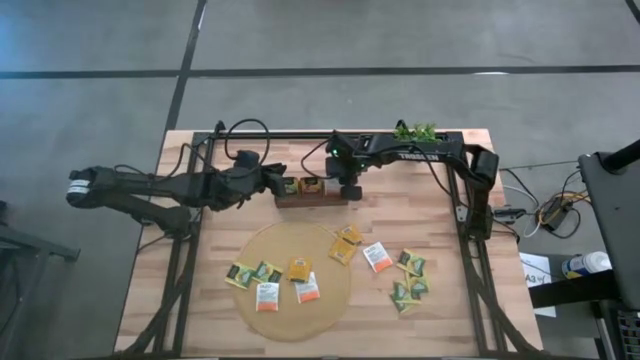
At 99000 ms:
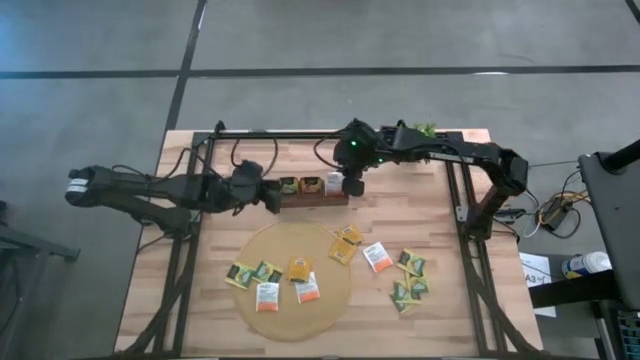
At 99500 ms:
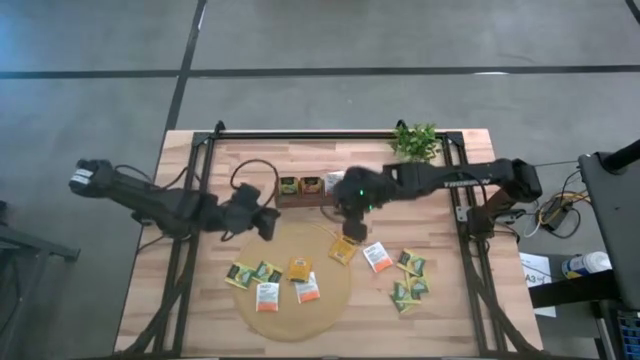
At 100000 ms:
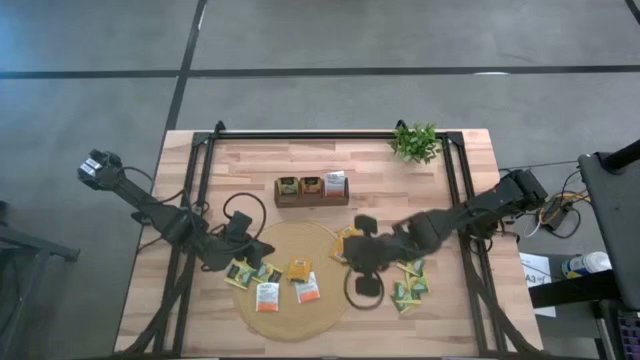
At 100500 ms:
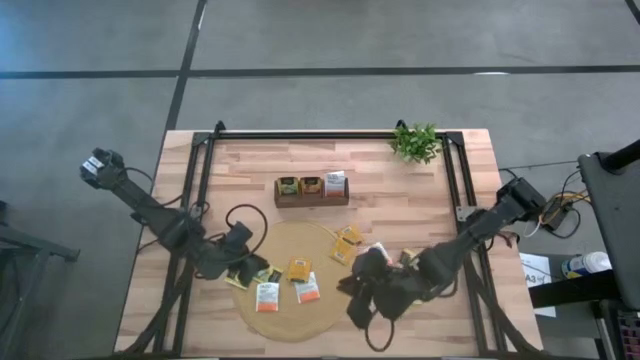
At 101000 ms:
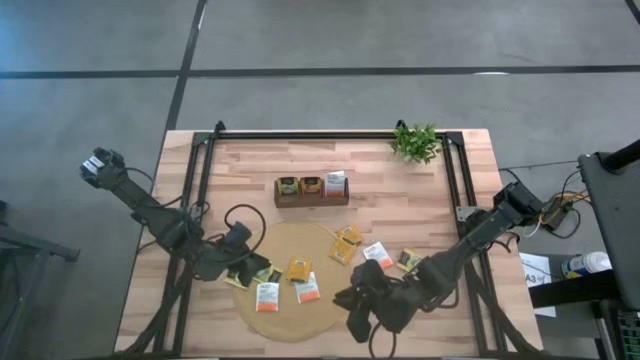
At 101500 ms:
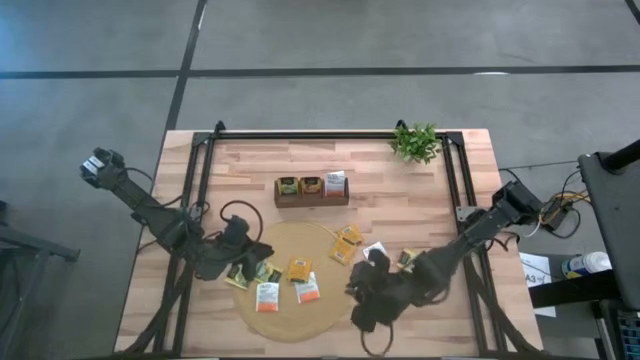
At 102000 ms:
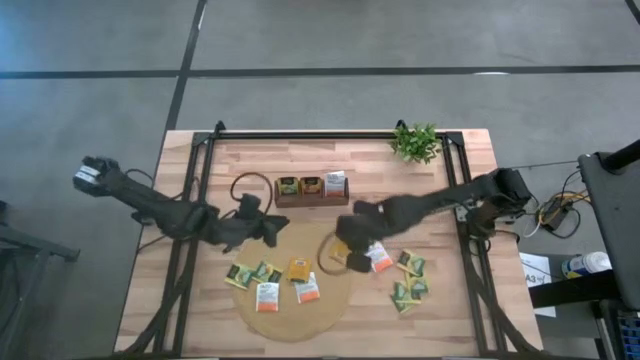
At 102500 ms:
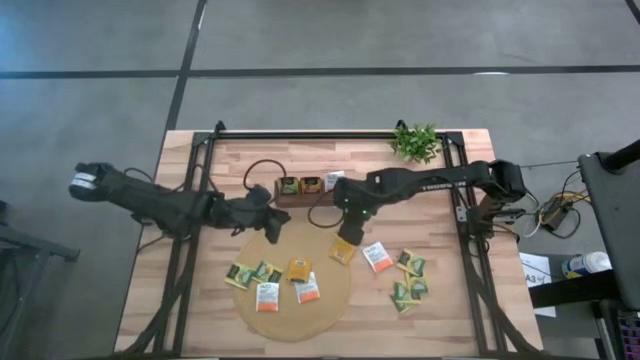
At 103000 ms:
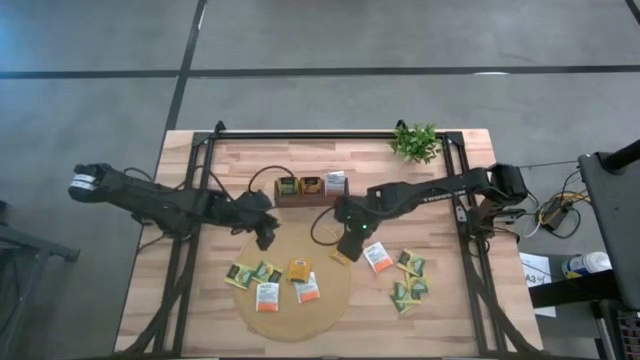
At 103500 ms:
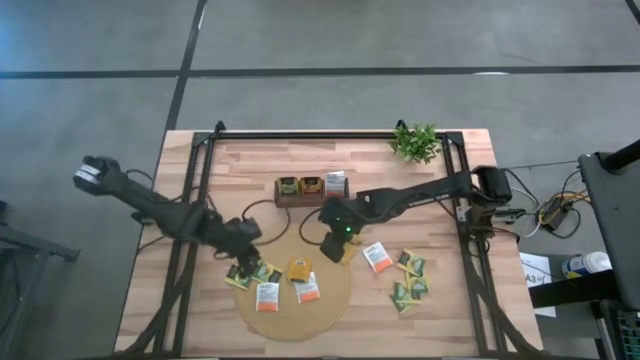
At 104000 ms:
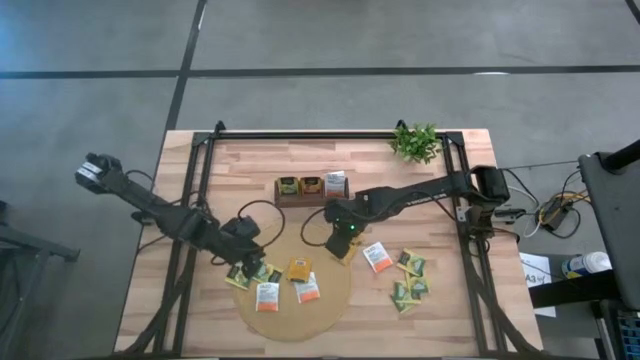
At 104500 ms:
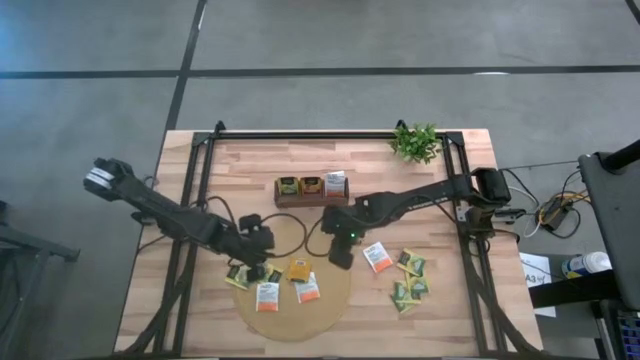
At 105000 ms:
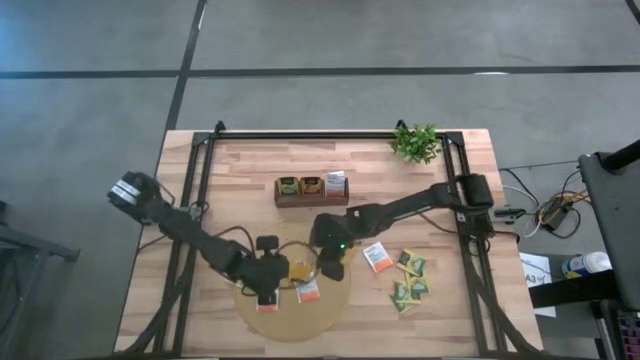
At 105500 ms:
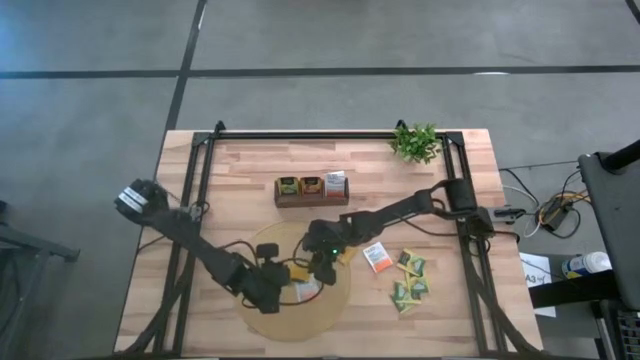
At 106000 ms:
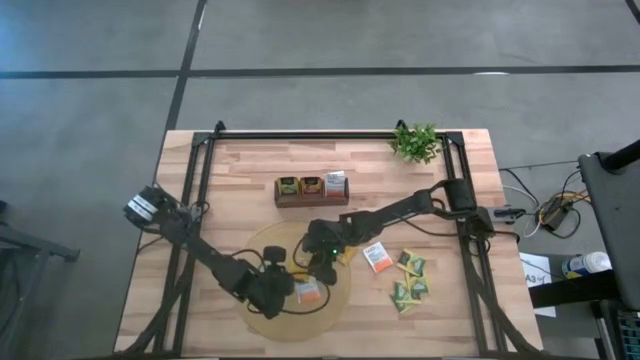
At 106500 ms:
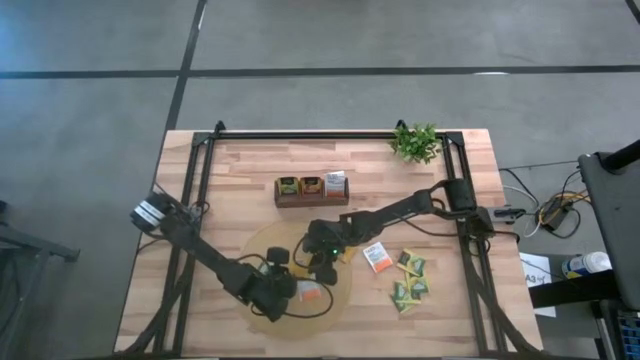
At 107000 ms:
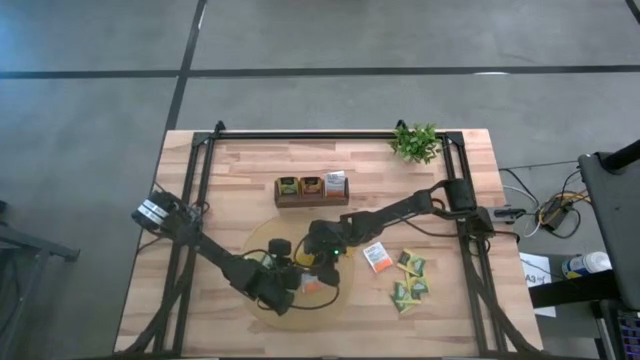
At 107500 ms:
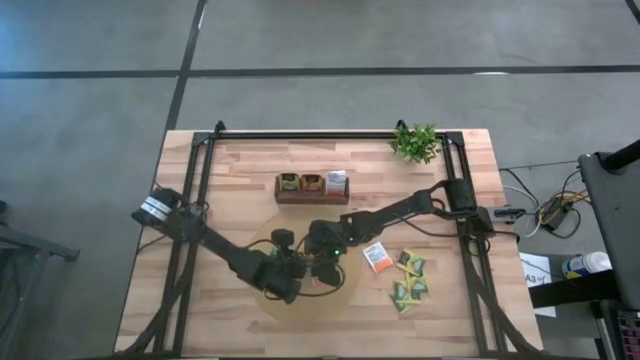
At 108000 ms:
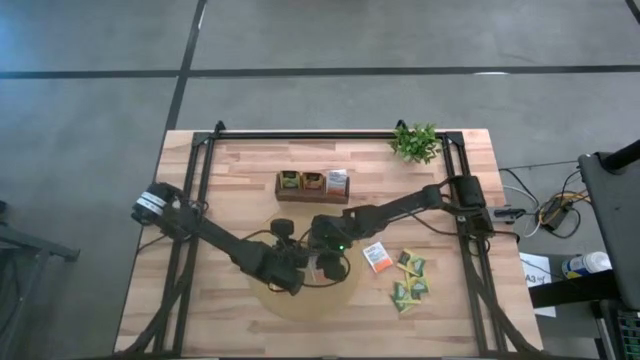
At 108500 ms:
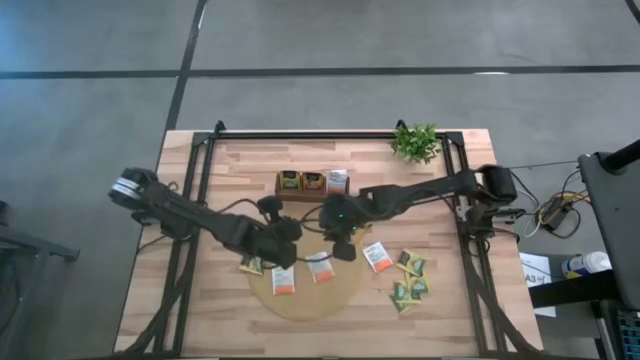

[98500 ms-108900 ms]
Task: Pick & Place Tea
Put the yellow tea bag into the middle section of the wooden organizer

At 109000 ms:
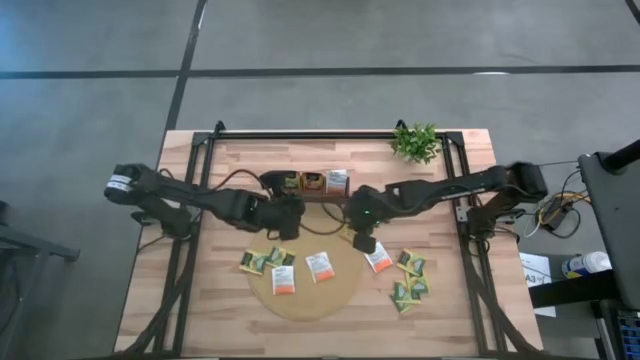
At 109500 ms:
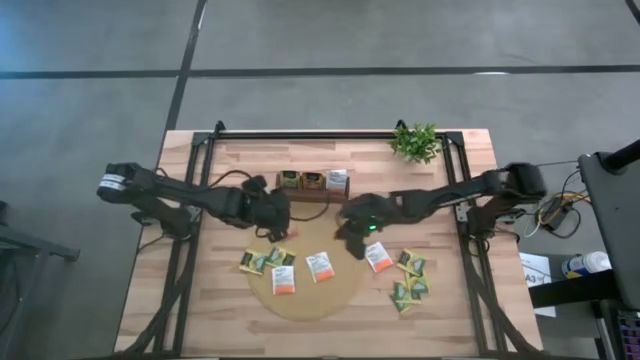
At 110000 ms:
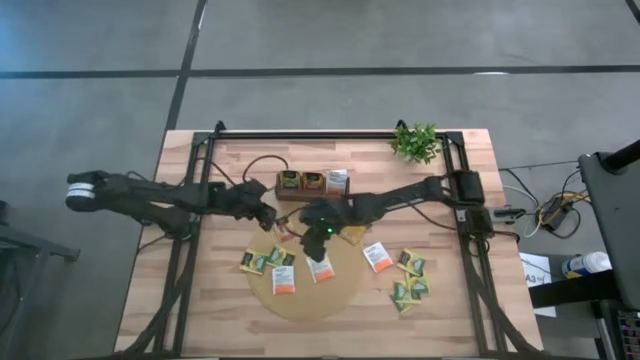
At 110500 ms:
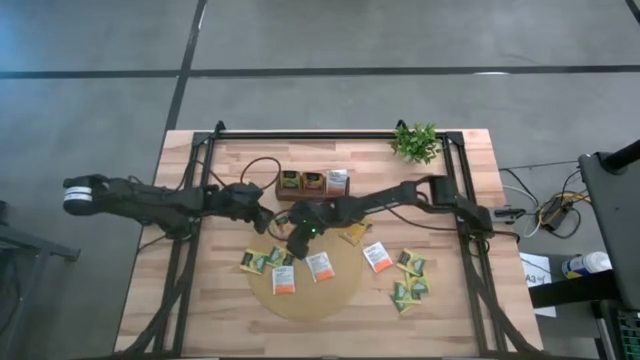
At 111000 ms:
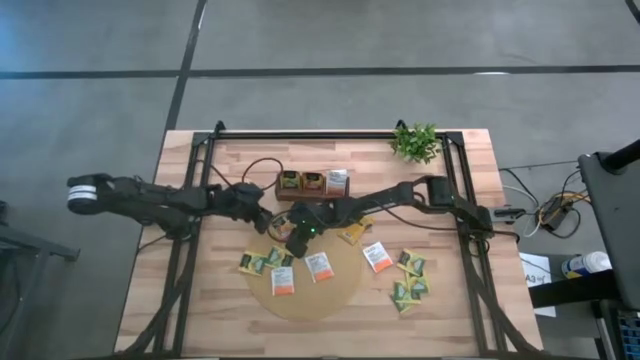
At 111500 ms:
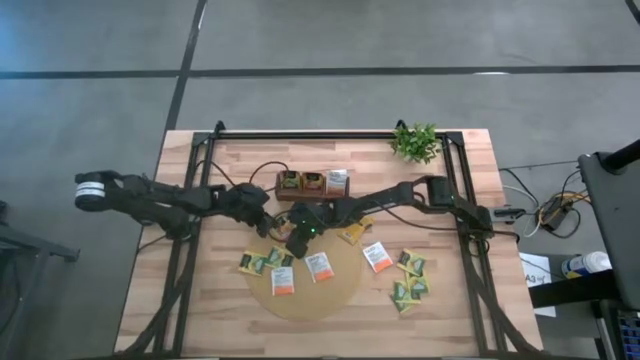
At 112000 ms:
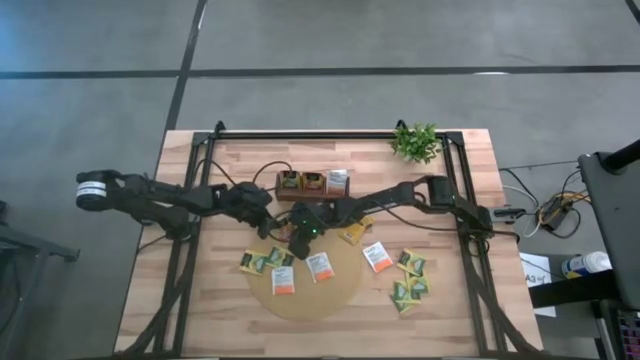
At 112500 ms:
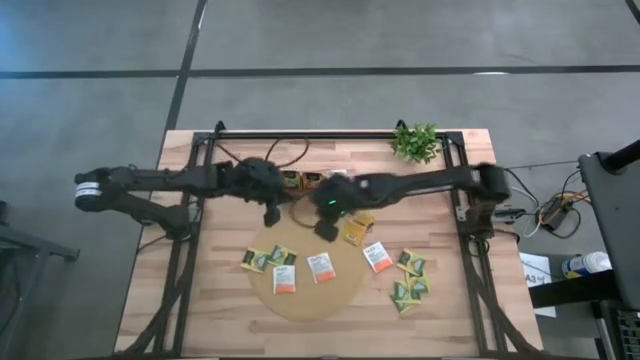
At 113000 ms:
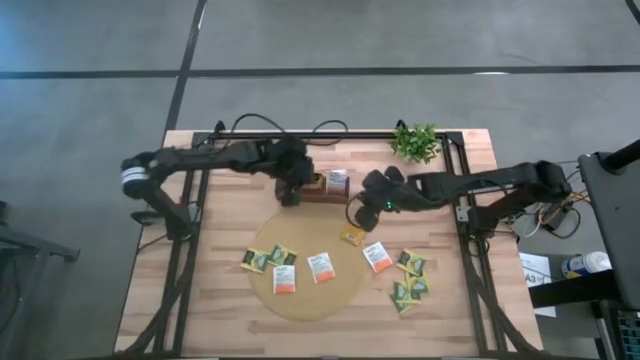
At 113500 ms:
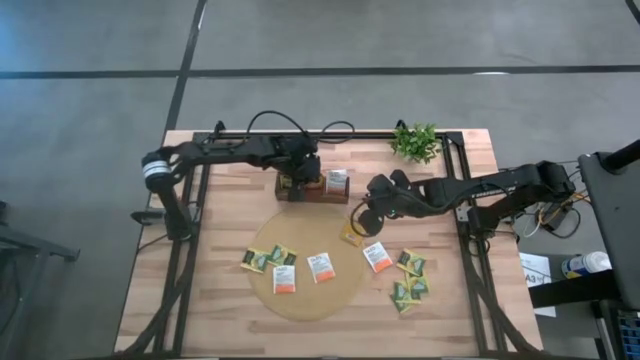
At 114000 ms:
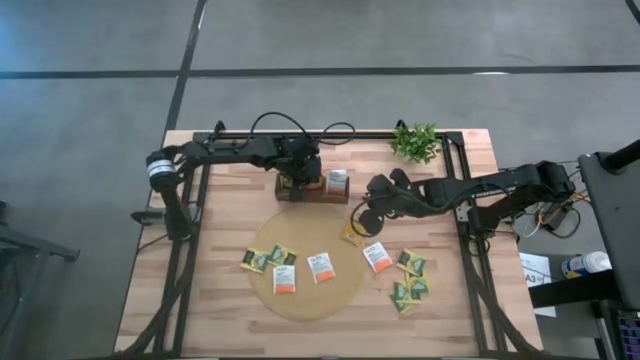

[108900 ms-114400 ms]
Put the yellow tea bag into the middle section of the wooden organizer

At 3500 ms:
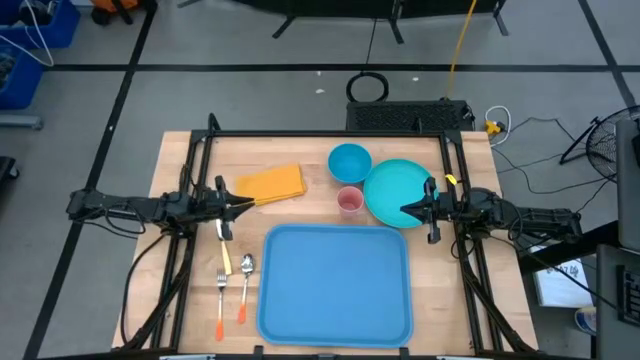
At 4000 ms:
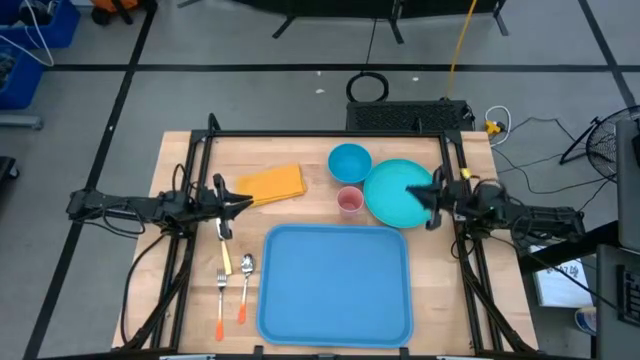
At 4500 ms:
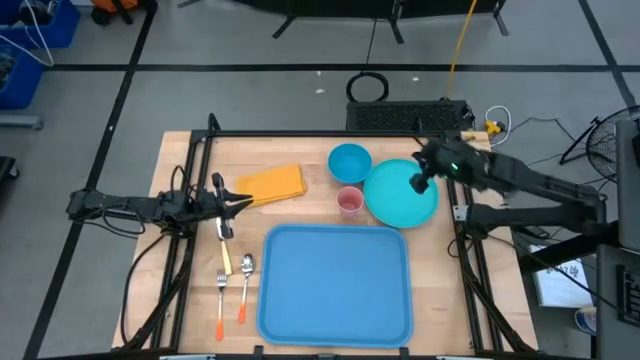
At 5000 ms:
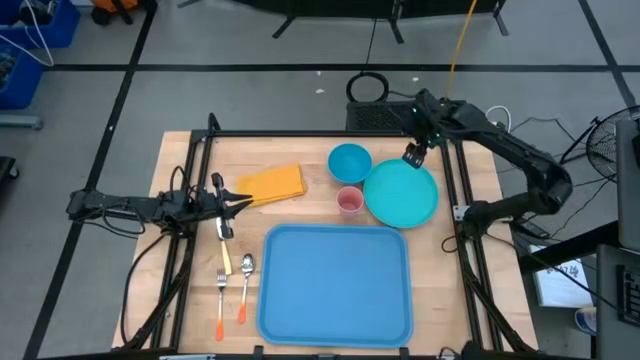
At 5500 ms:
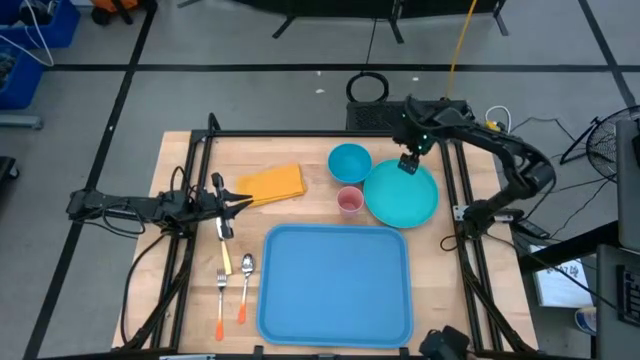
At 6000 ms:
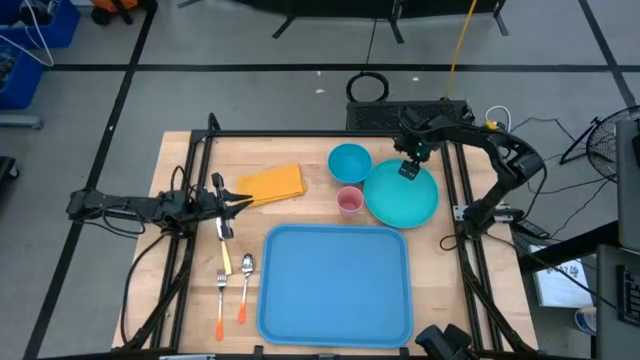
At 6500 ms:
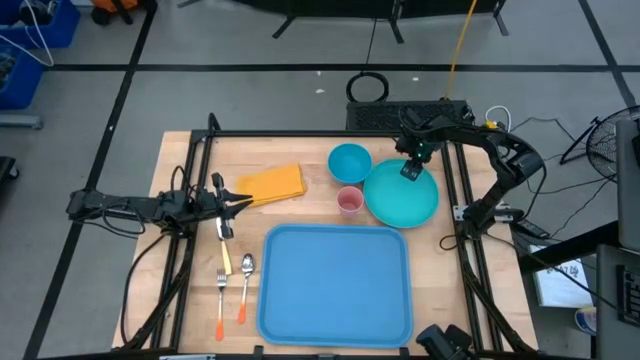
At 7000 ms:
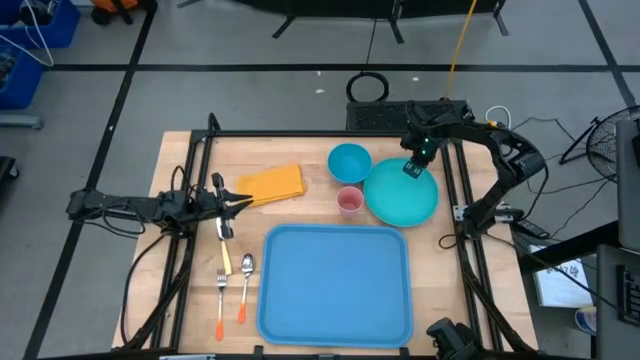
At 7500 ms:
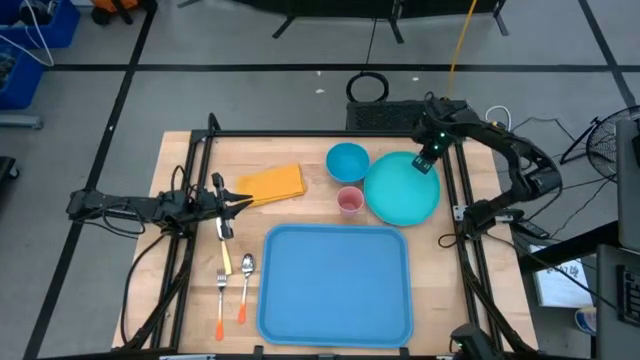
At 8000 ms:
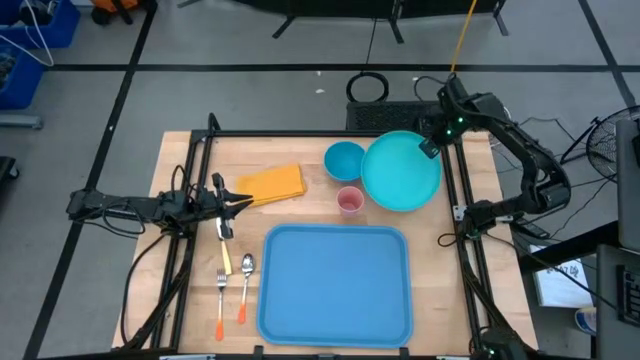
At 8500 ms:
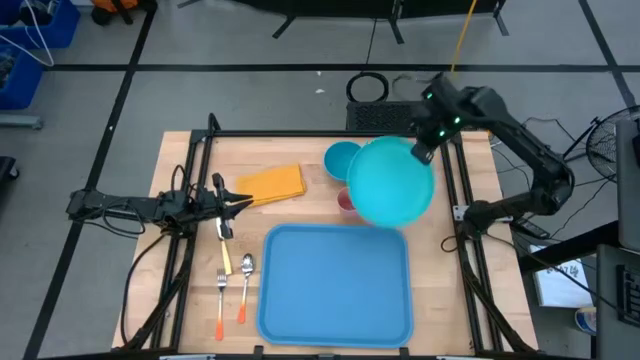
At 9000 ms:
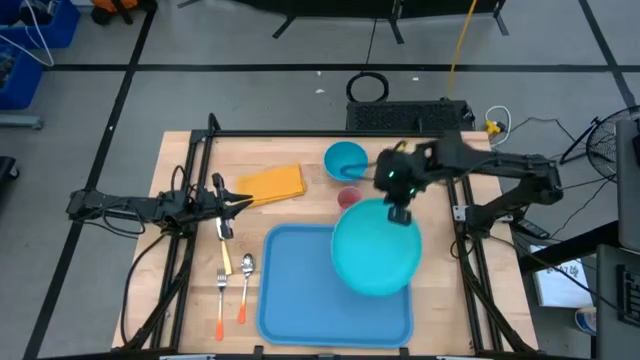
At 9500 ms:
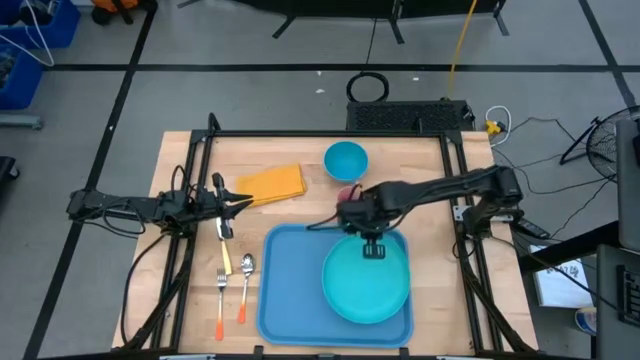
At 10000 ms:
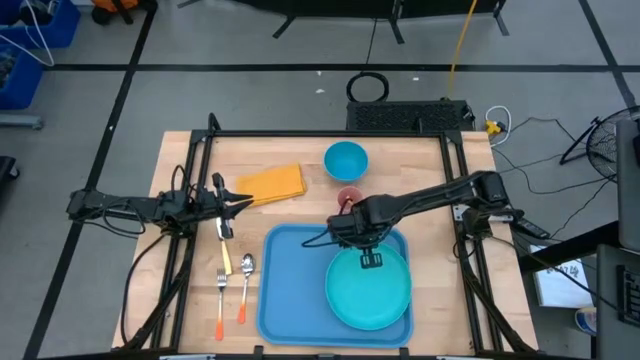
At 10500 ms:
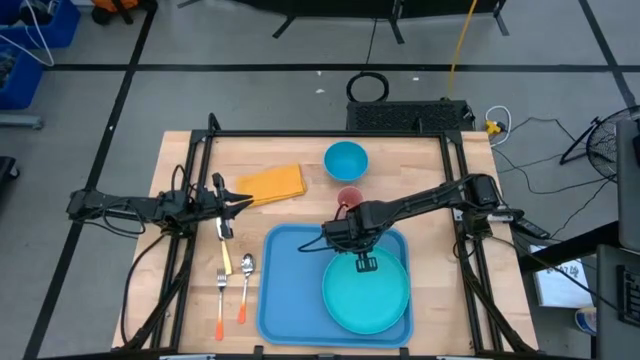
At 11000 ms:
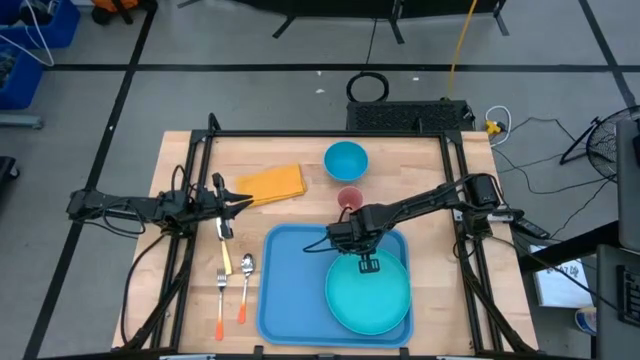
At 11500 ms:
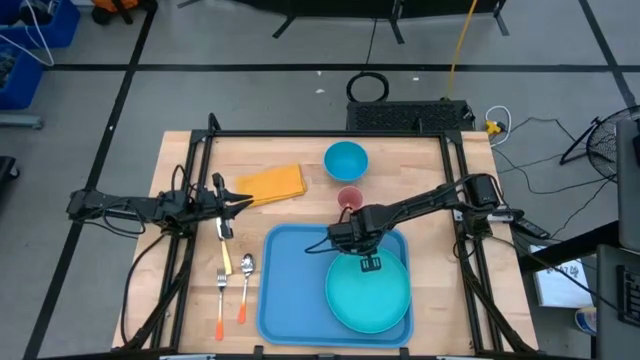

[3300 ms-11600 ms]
Task: Set up tray
Put the blue plate on the right of the tray
